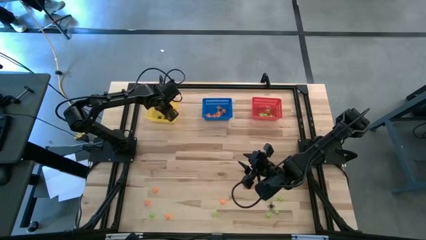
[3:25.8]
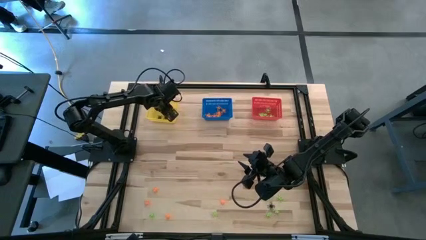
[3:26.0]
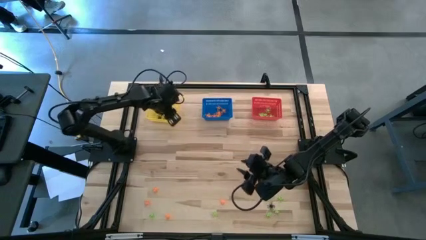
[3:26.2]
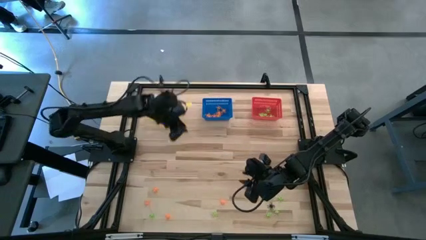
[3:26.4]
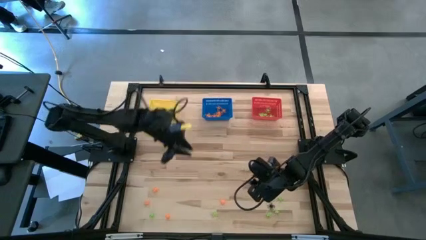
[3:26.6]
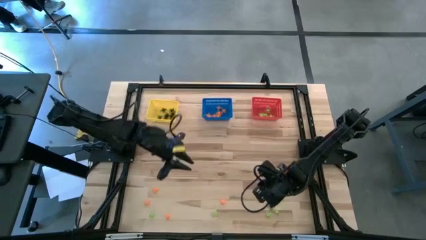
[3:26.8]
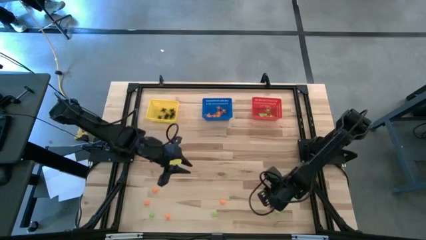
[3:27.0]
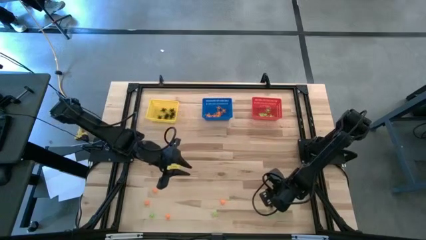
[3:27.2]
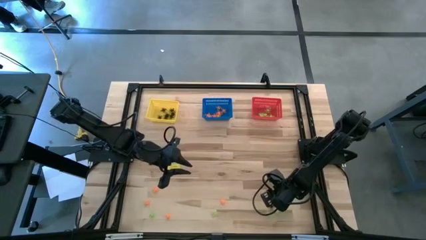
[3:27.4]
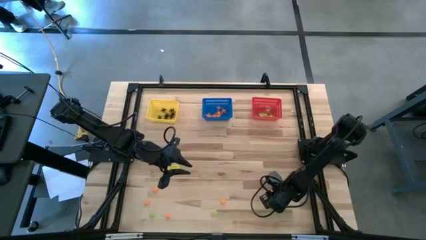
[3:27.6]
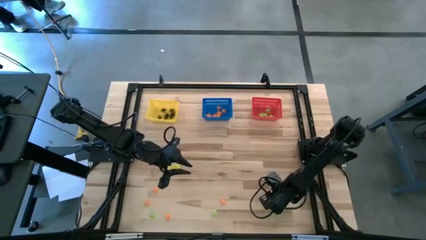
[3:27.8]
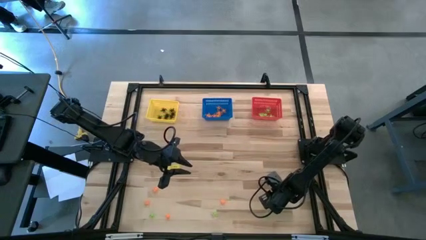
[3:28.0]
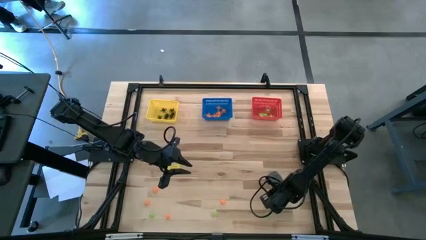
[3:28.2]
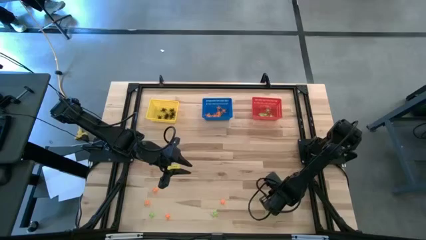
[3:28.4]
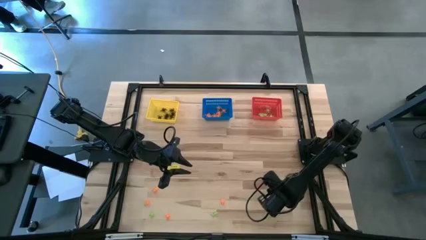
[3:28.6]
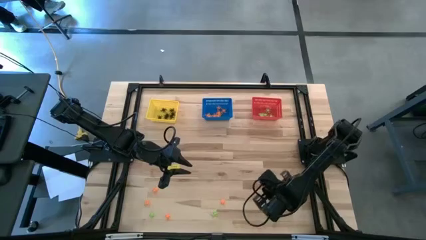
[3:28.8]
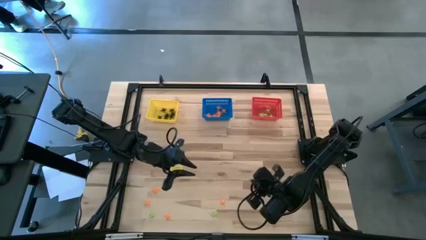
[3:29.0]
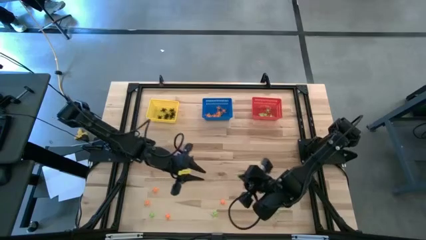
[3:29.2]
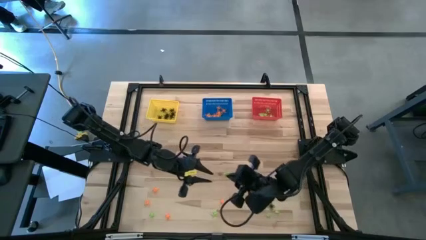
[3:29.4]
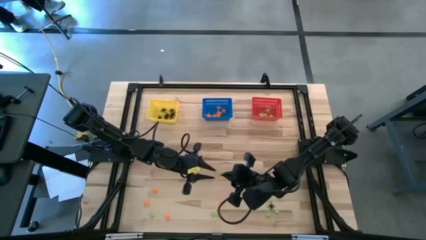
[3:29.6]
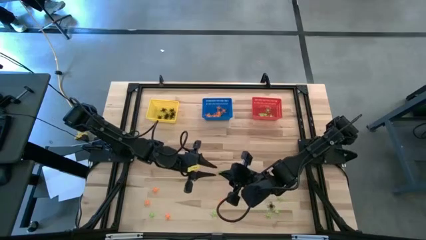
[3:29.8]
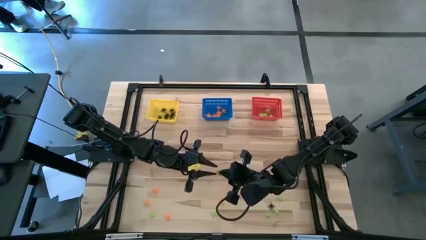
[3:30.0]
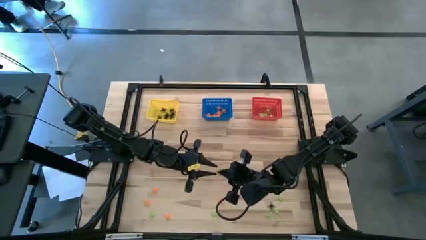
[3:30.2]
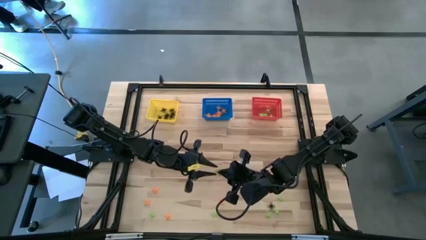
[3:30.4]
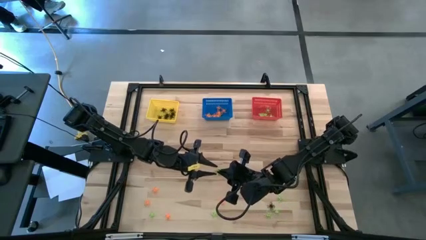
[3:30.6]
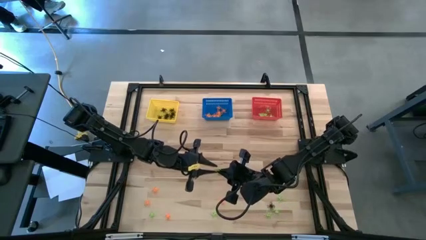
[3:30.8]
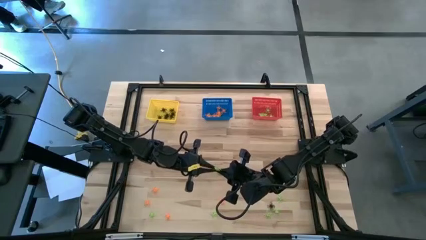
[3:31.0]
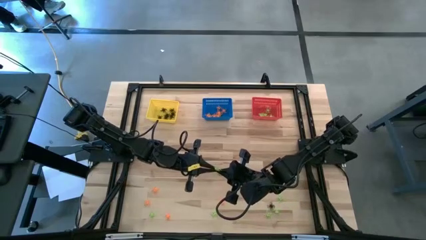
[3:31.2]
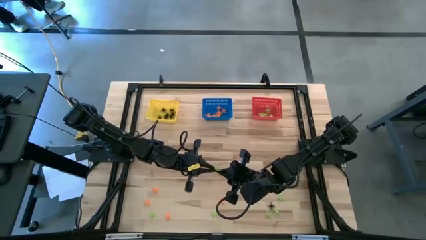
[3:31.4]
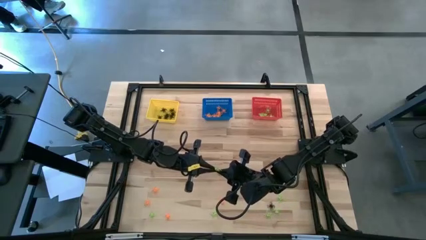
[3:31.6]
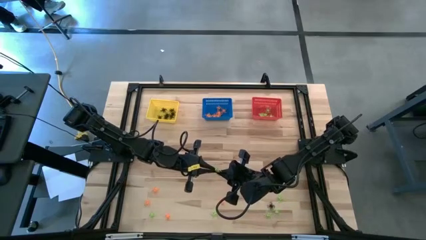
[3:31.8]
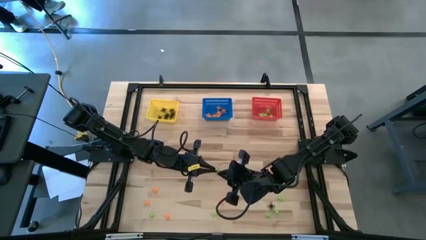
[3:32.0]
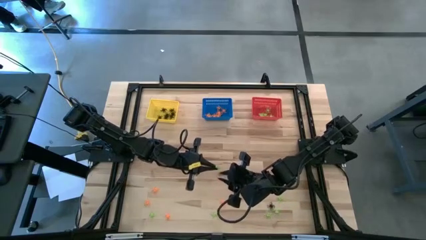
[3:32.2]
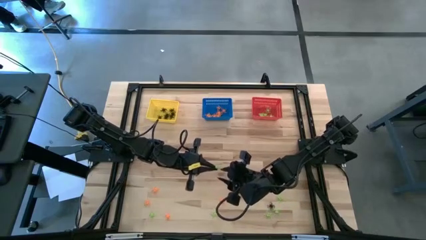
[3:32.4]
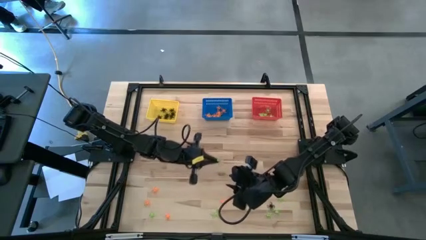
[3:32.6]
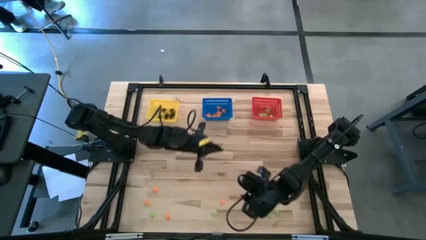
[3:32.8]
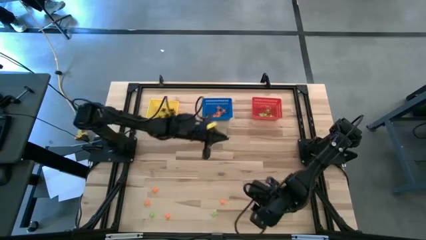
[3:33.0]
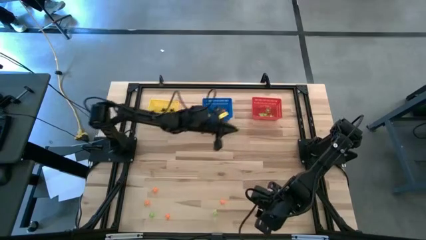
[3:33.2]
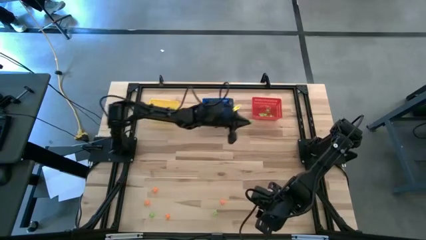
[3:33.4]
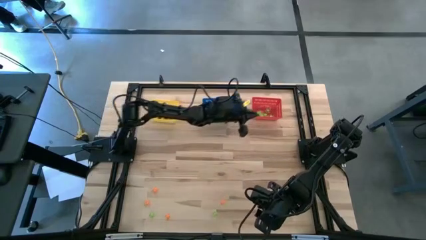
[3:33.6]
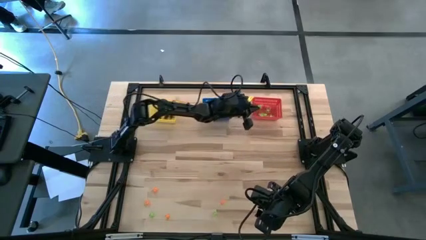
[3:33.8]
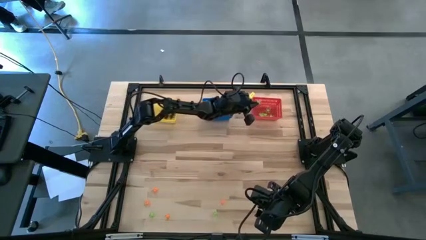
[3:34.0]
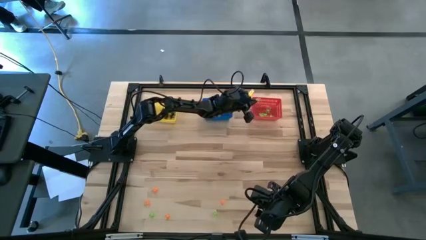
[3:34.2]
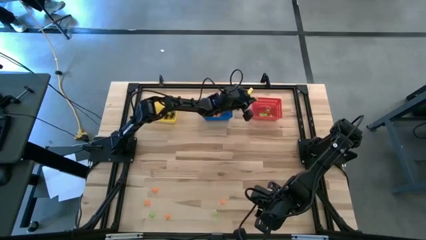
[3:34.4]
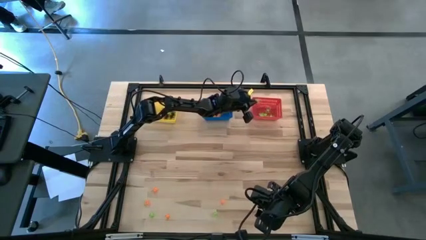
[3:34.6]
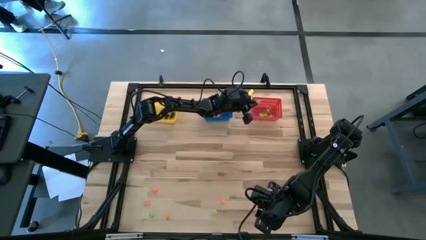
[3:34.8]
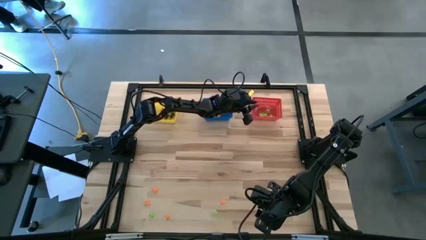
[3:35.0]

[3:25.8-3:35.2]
Task: Sort Halloween decoration
Put the green spider toy into the basket

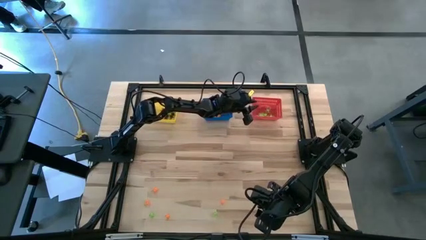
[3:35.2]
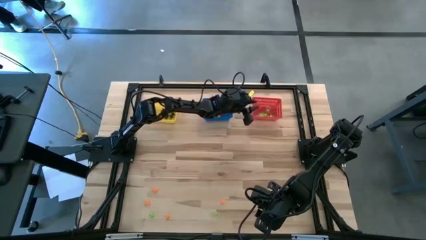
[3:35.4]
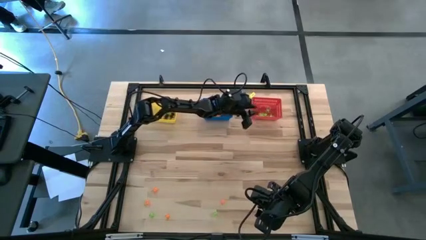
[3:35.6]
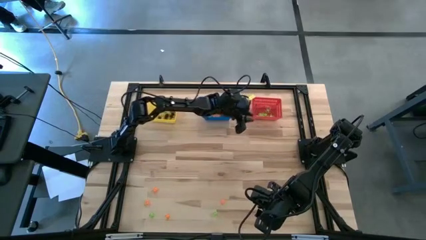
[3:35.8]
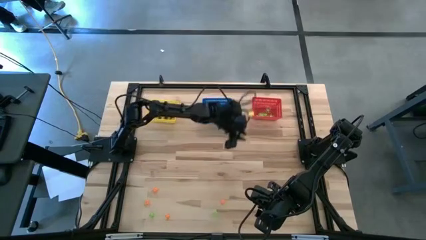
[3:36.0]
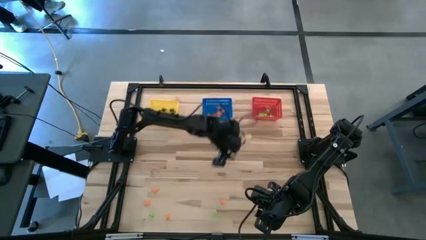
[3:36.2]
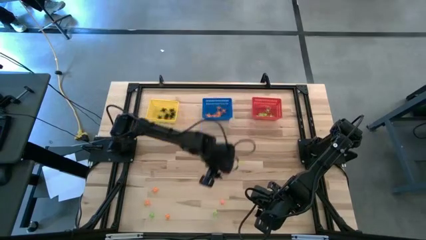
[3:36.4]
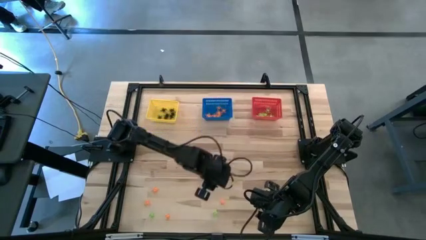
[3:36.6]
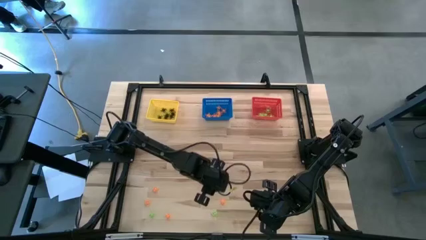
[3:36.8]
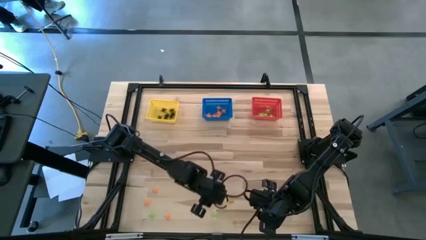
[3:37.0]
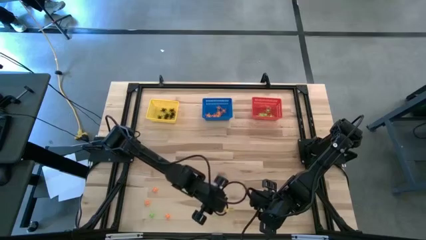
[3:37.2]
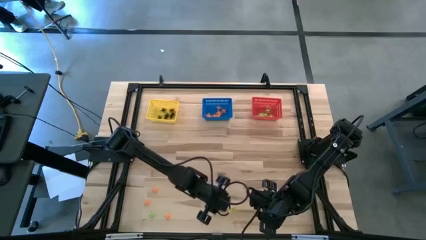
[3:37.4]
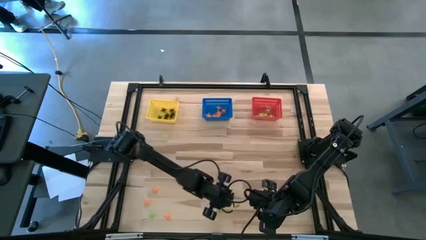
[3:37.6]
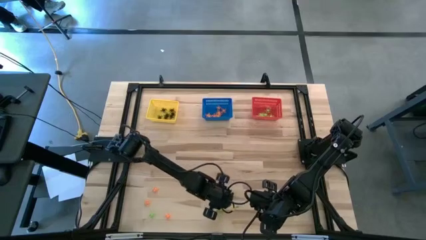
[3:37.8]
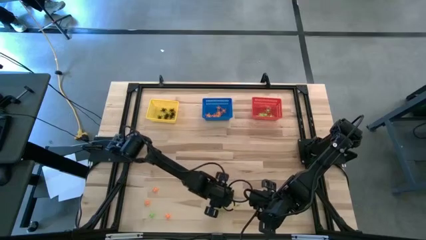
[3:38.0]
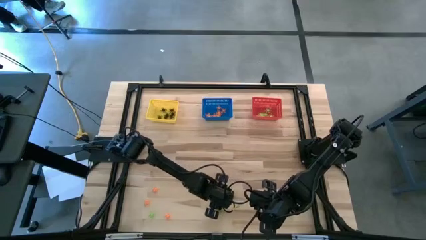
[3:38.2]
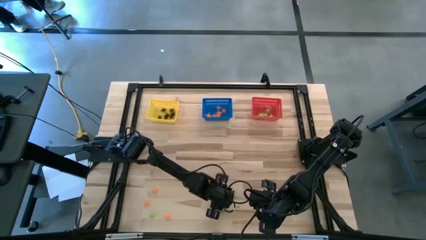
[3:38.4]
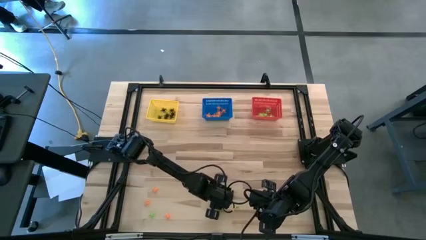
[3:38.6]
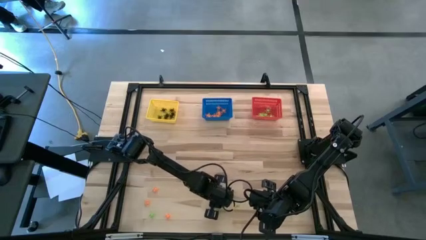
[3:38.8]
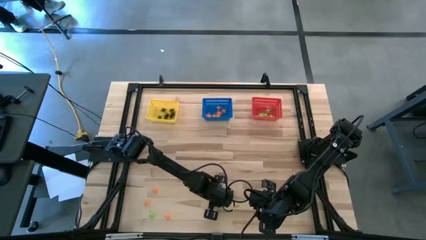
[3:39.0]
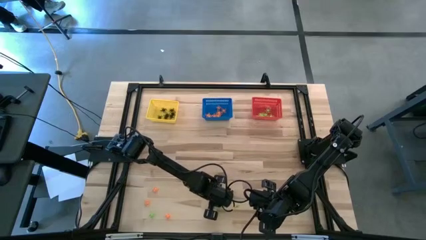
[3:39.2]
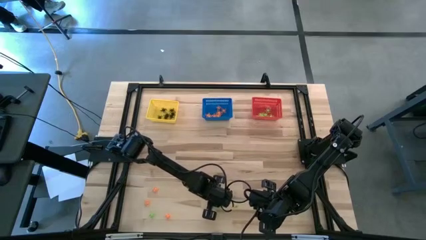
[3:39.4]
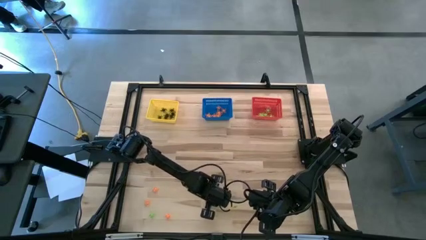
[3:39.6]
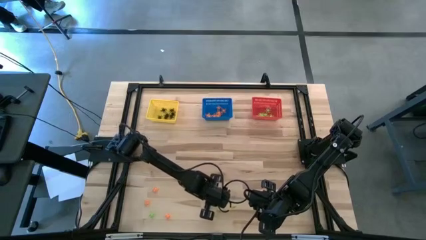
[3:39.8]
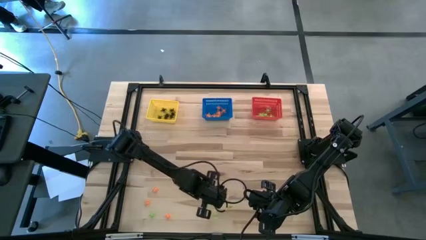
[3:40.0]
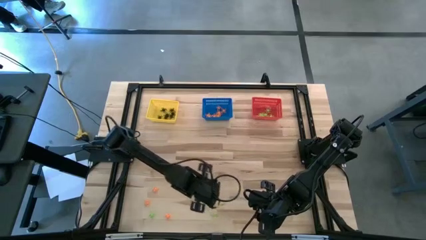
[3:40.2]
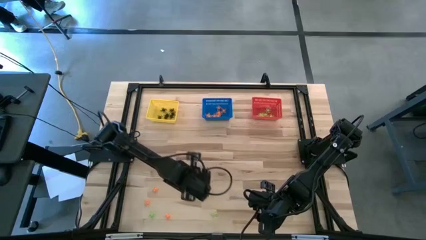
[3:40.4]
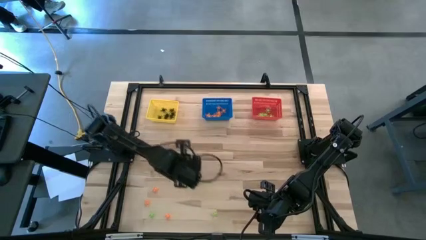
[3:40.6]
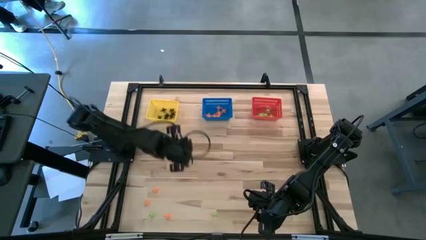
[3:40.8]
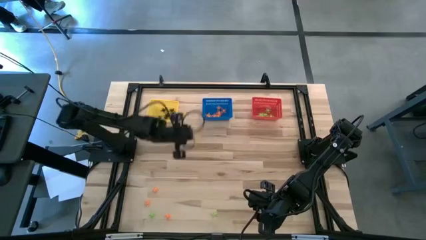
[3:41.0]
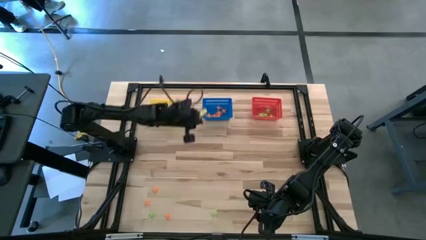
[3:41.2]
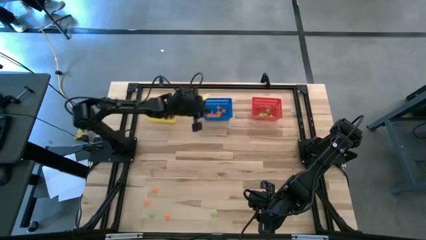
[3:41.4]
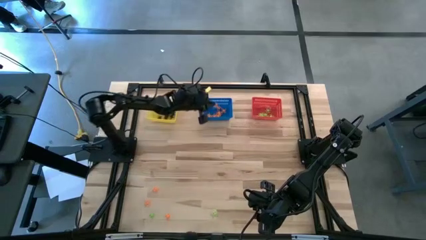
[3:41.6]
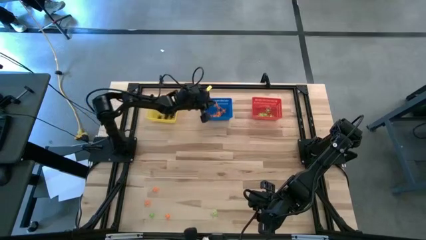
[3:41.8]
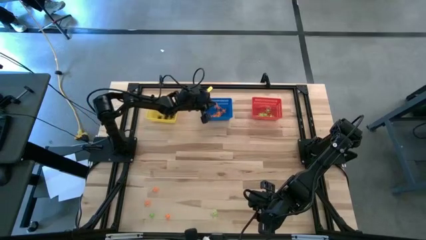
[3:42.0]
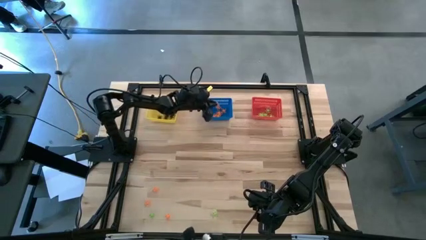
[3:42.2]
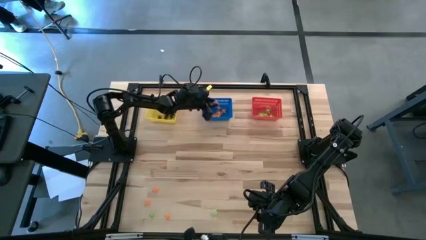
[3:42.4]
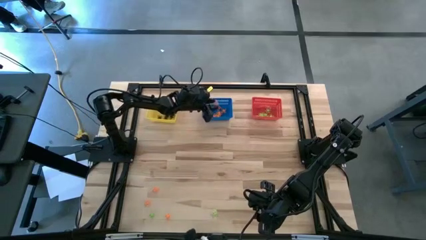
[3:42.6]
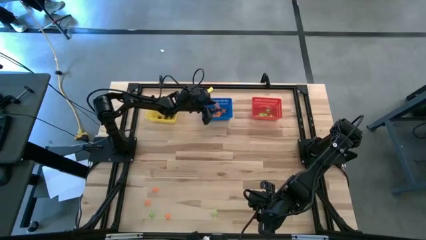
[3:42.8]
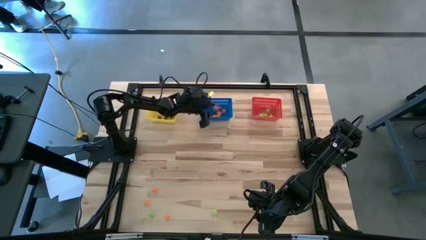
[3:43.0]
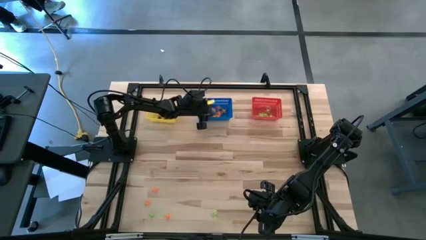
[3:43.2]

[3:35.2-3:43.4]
Put the orange spider toy into the blue basket
